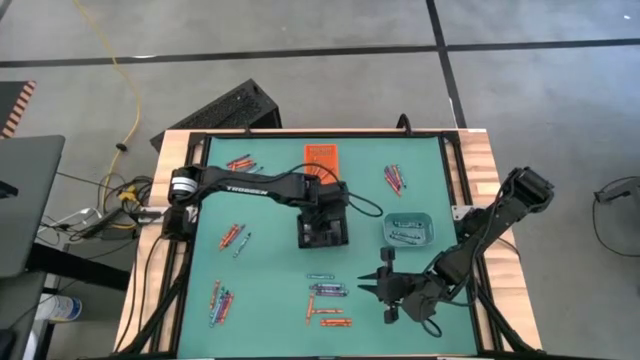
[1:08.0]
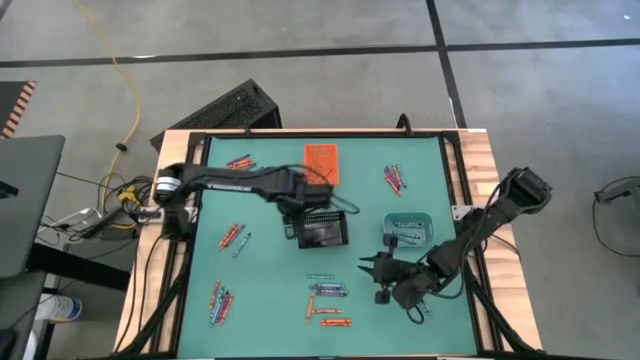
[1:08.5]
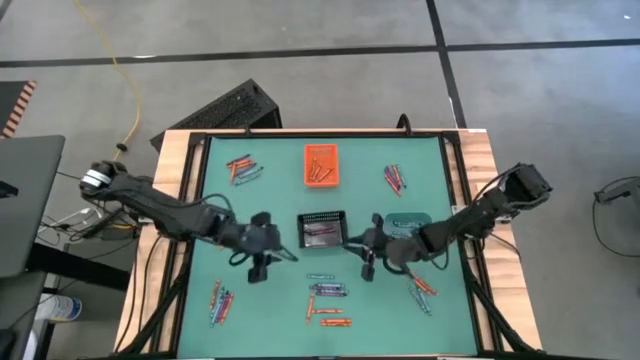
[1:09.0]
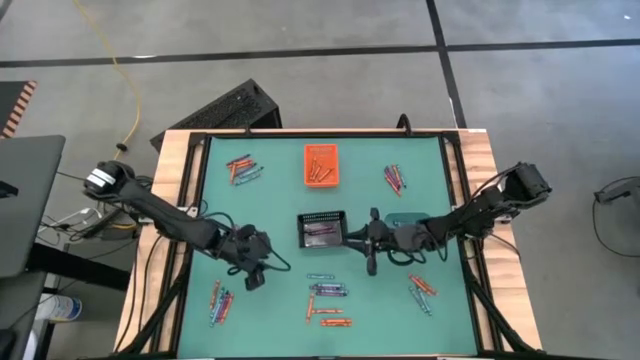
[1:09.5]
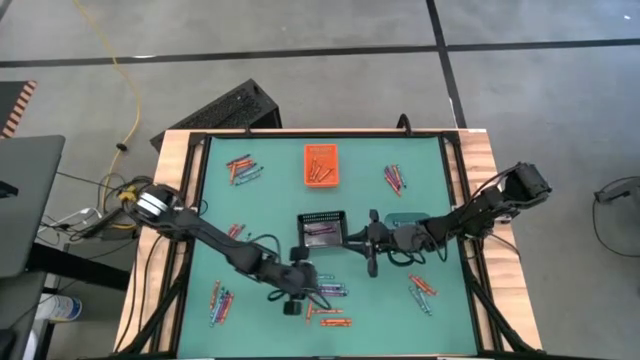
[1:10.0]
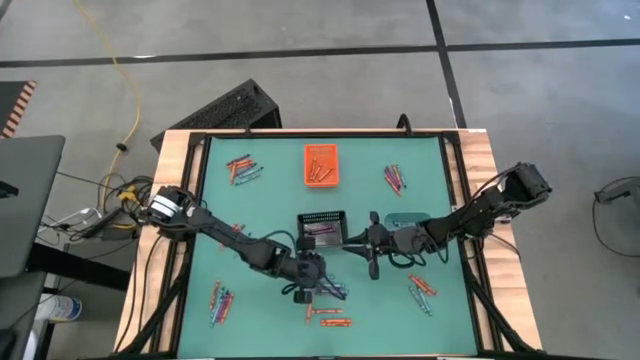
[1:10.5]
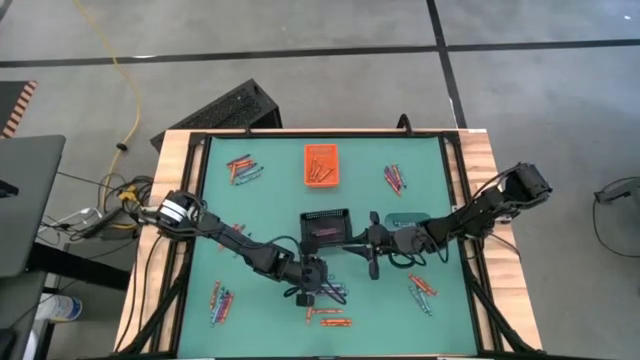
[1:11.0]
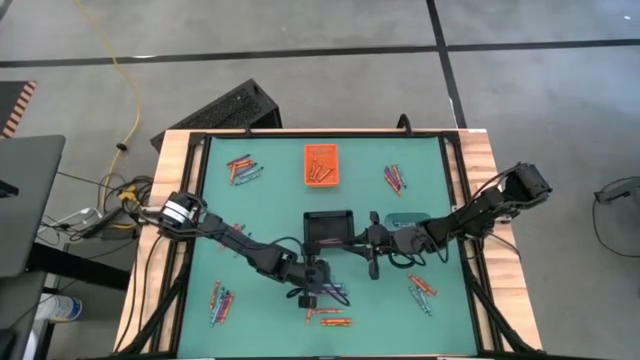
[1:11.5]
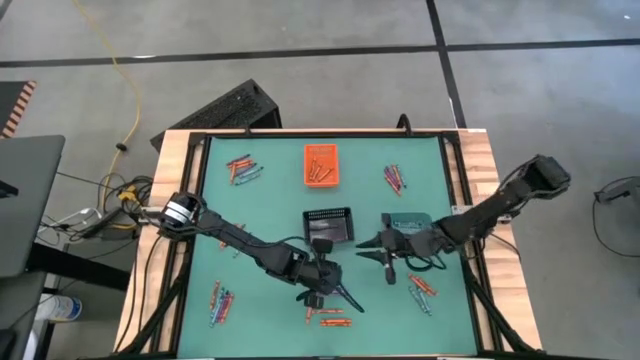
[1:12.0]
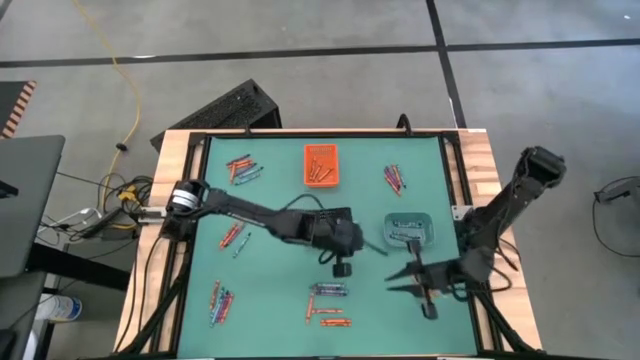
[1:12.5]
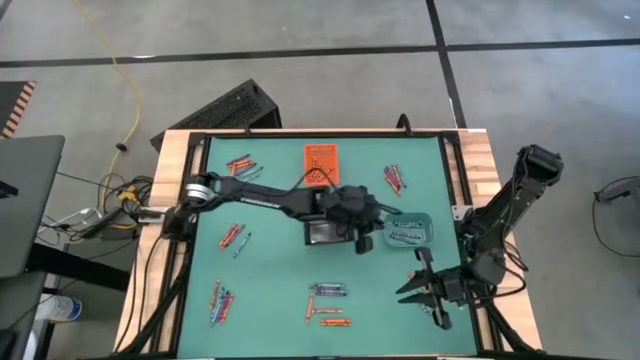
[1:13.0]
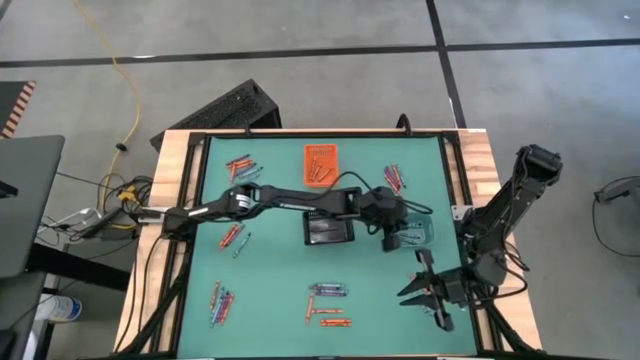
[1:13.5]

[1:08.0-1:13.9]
Task: Sort crayons
Put the blue crayon into the green bin

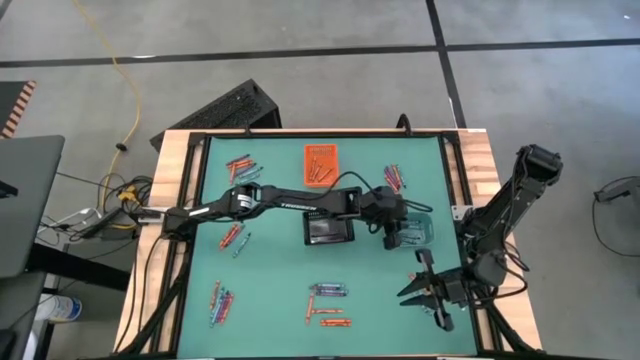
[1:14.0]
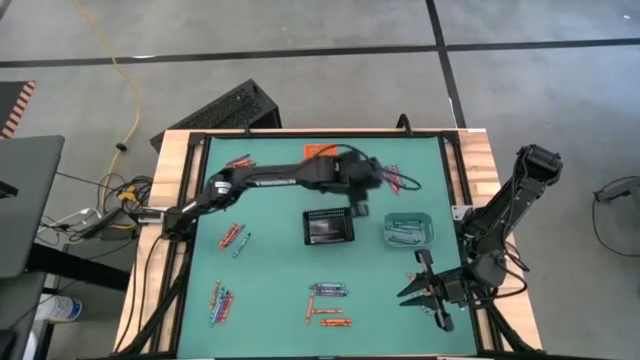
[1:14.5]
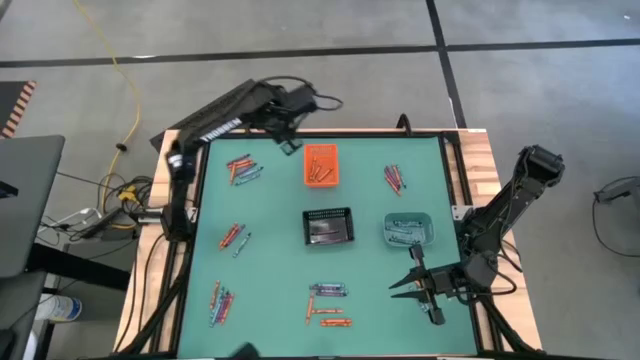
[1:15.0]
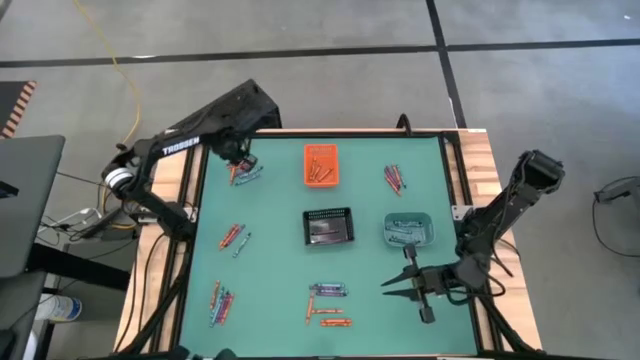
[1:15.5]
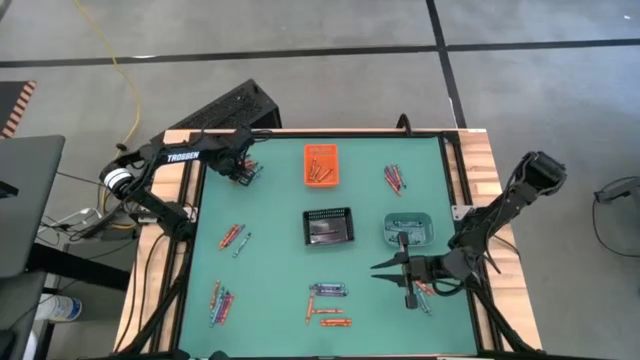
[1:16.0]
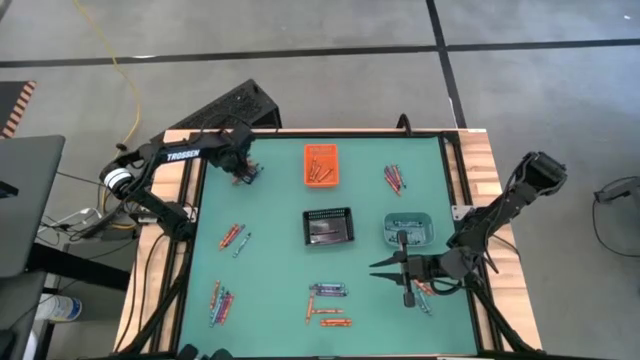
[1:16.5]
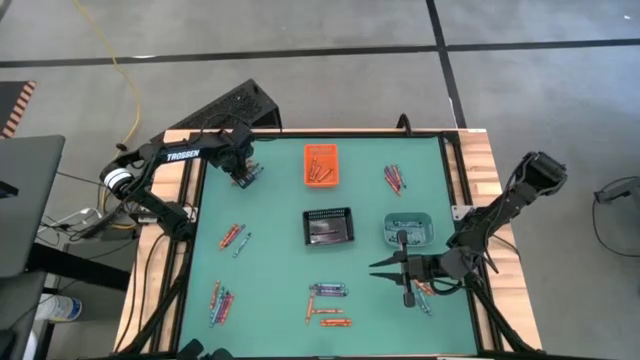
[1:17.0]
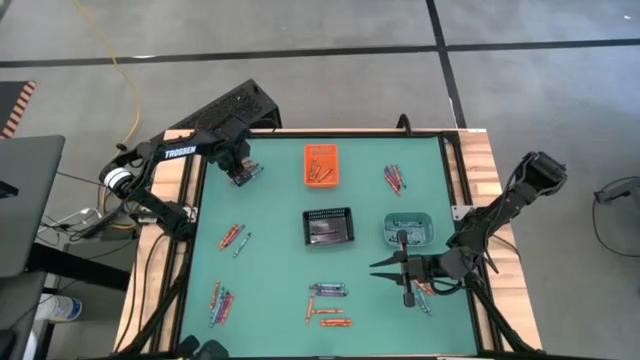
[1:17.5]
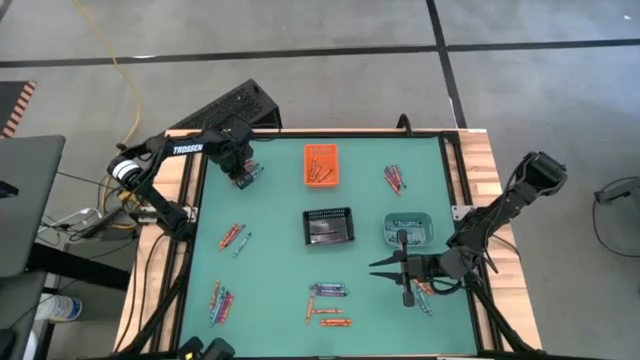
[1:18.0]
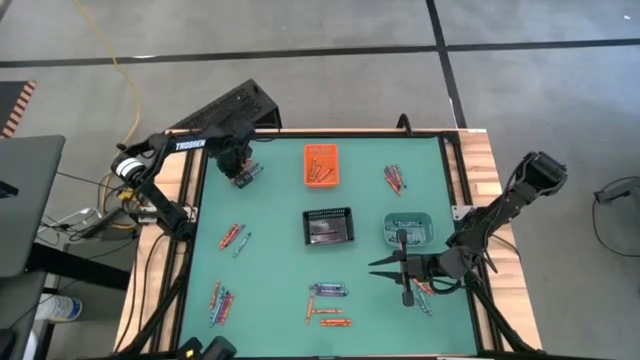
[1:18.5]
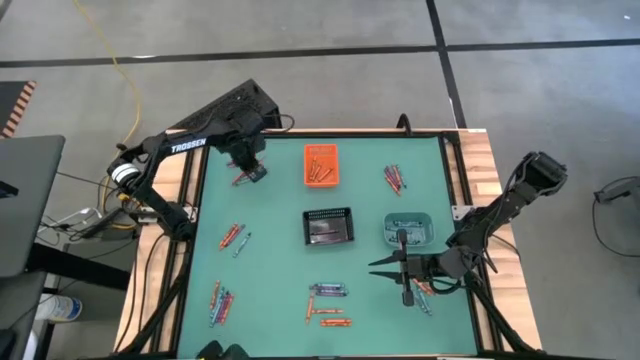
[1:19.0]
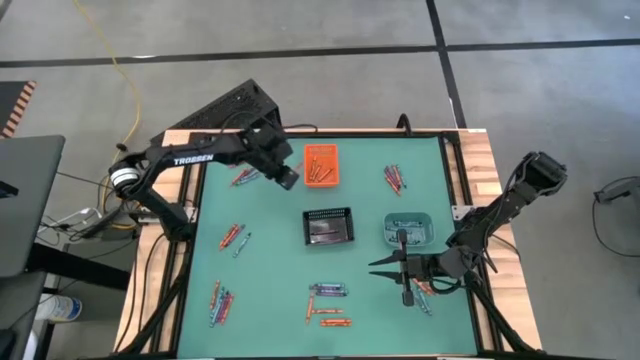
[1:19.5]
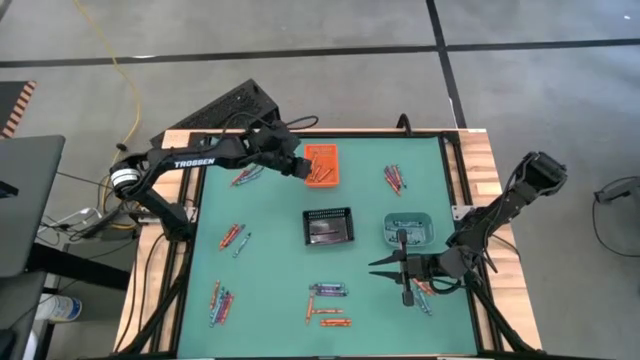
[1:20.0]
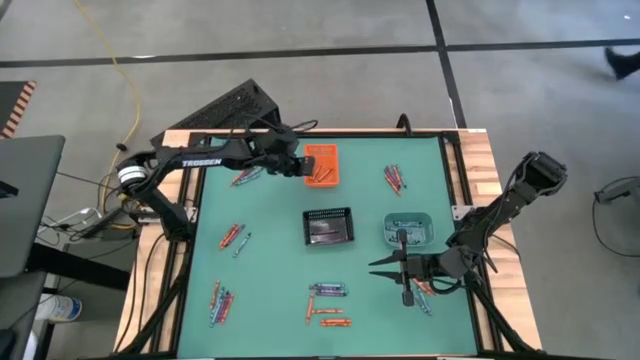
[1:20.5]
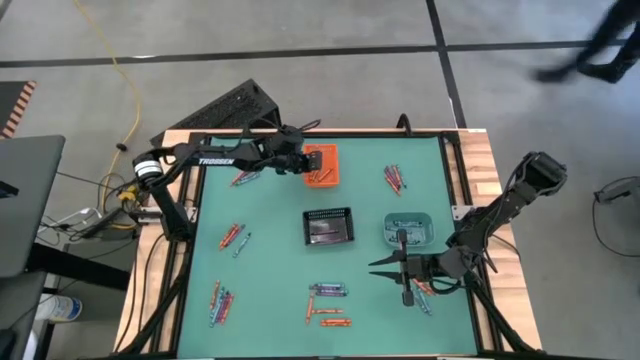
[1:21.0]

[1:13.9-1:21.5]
Put the orange crayon into the orange bin

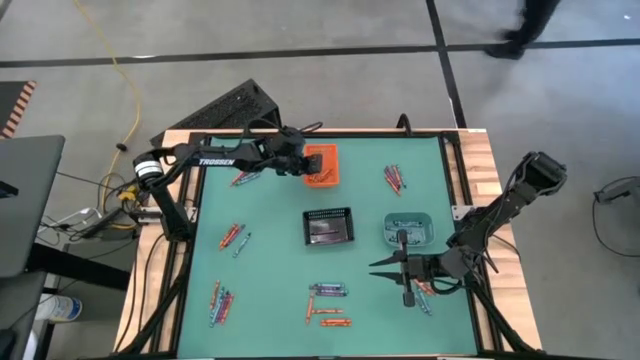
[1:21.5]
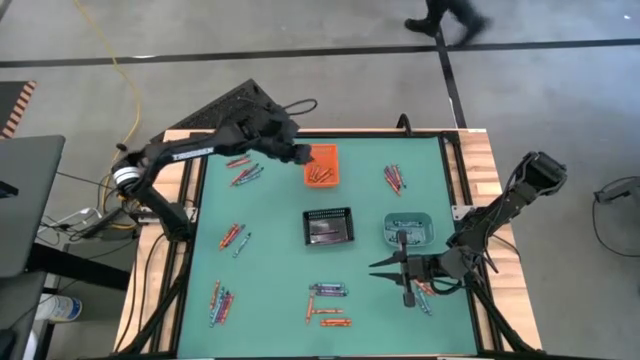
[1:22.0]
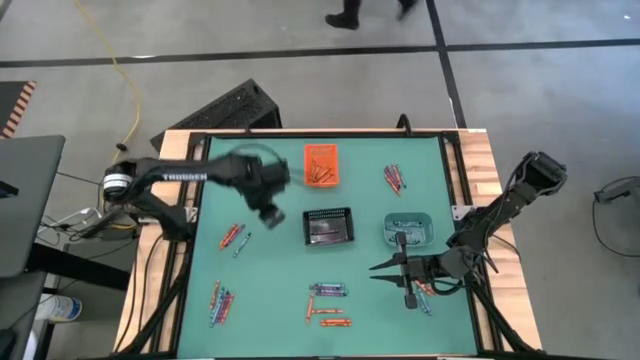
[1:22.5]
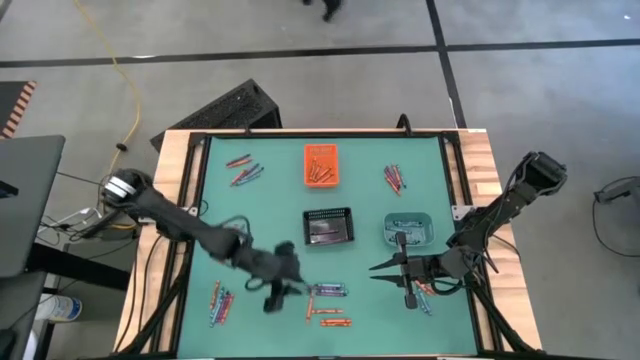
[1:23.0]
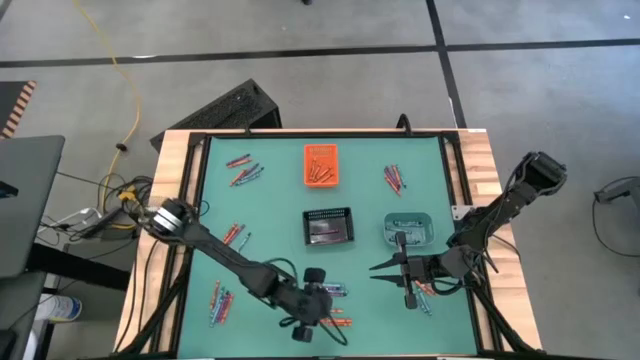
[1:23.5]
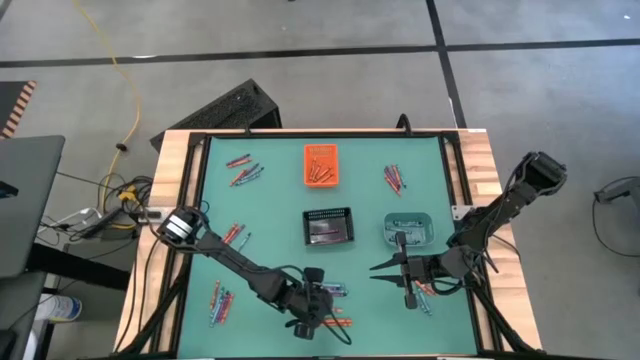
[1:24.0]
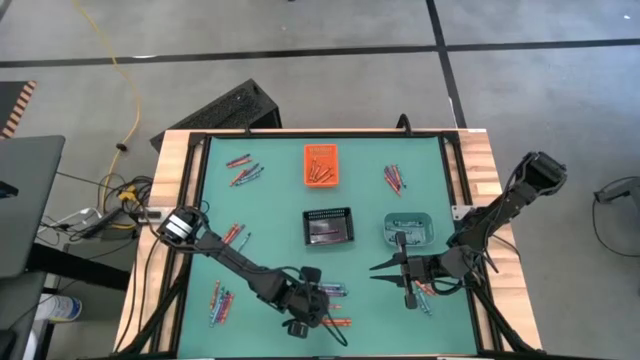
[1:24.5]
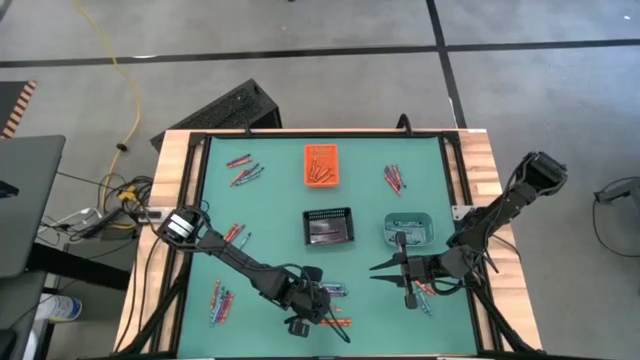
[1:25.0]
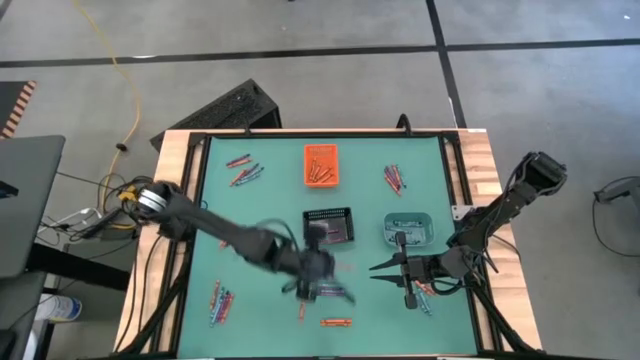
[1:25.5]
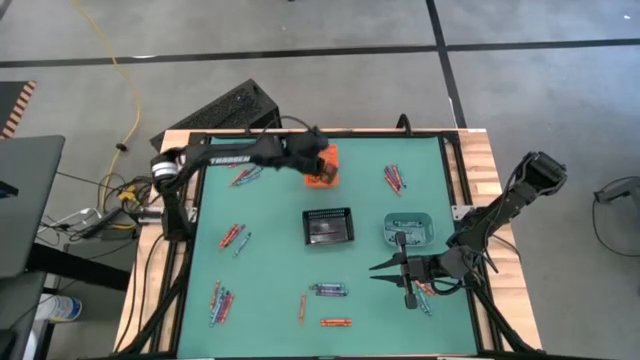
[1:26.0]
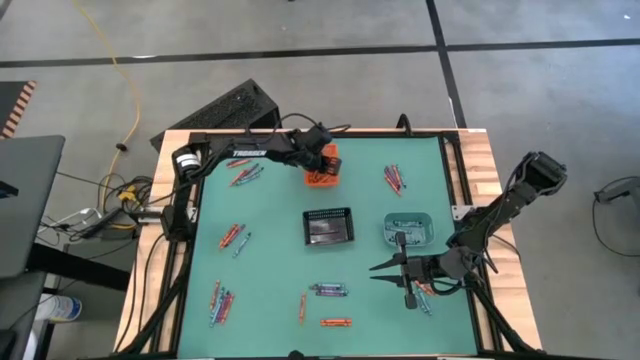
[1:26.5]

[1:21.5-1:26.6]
Put the orange crayon into the orange bin

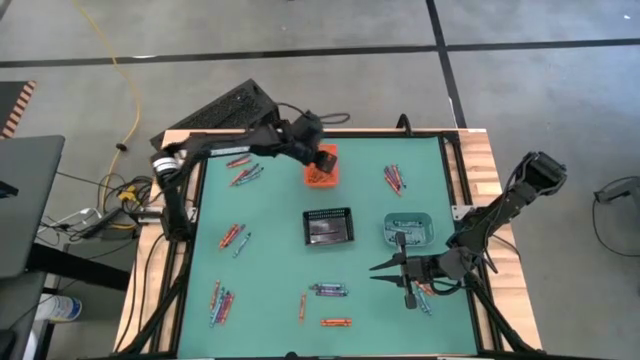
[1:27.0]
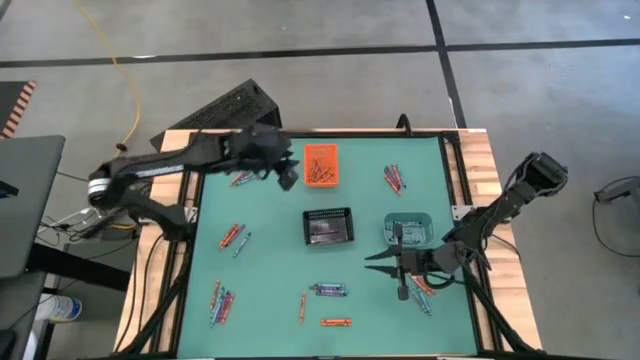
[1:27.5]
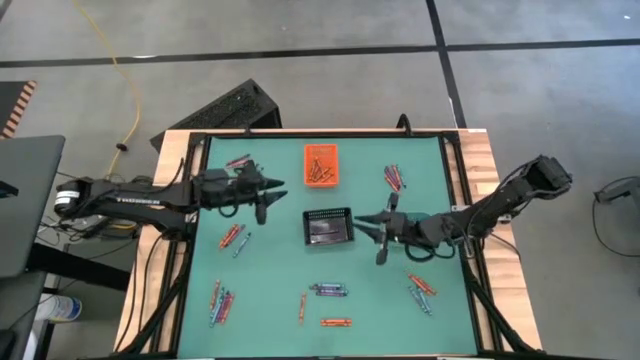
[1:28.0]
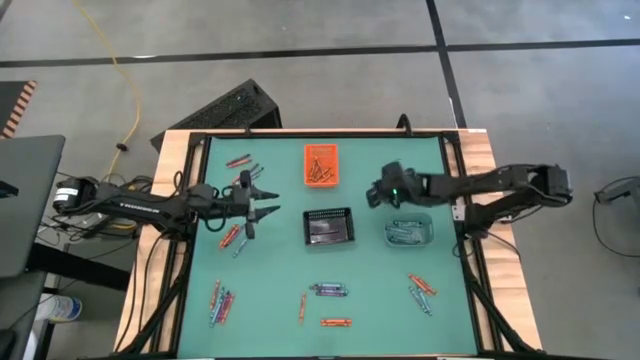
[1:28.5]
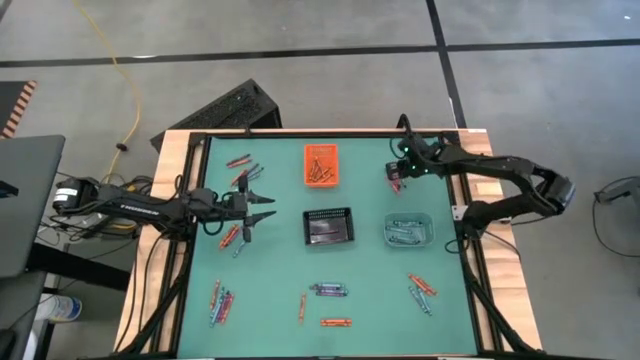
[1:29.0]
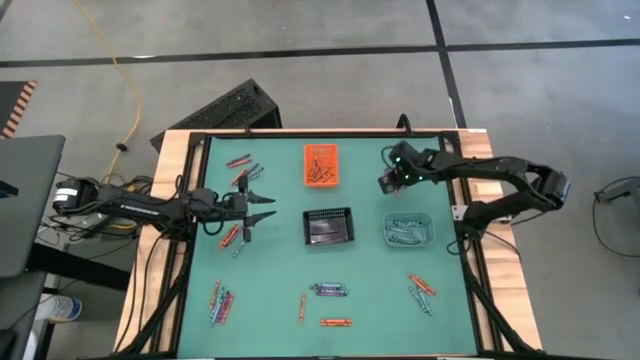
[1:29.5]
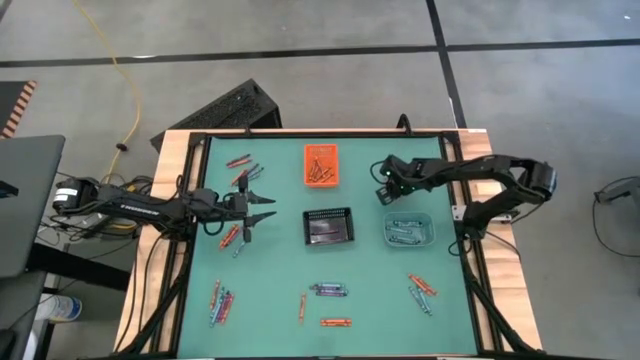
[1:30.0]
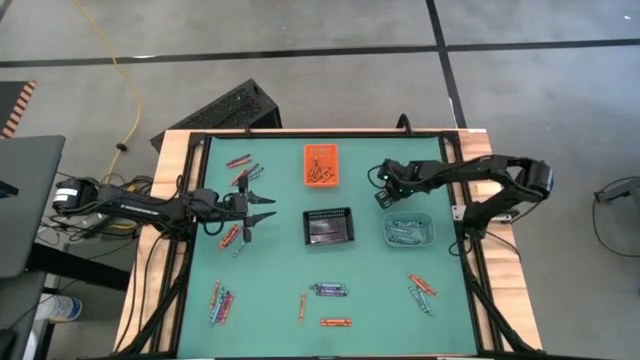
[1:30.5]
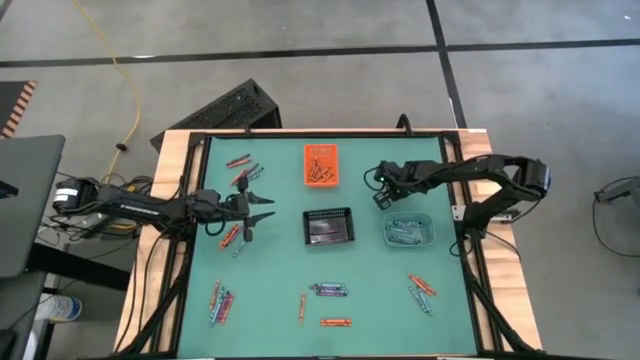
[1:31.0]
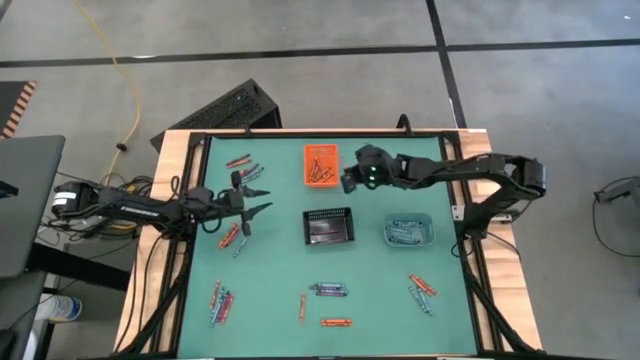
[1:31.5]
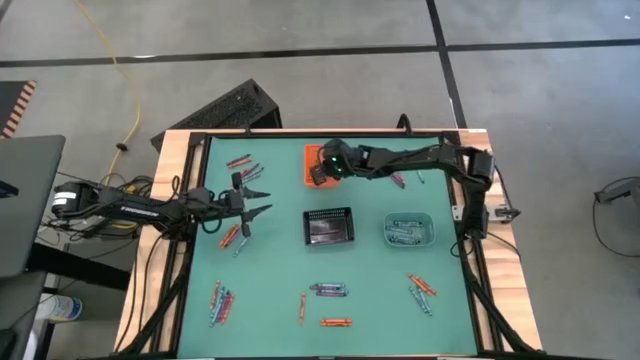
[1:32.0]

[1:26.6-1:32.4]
Put the orange crayon into the orange bin
